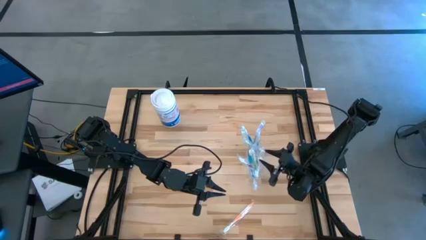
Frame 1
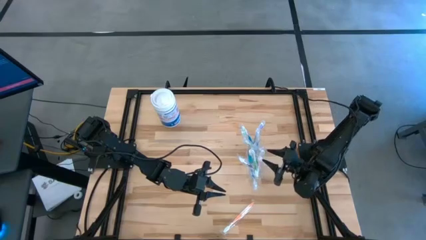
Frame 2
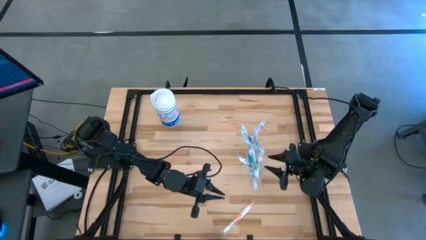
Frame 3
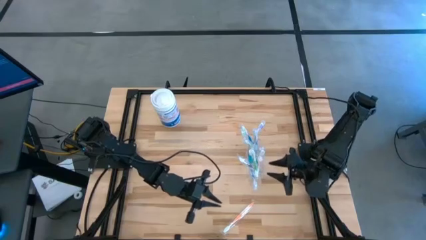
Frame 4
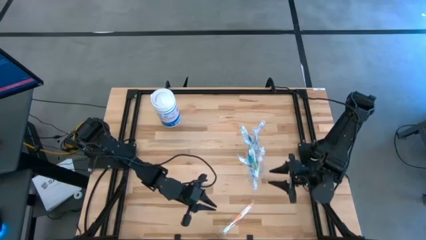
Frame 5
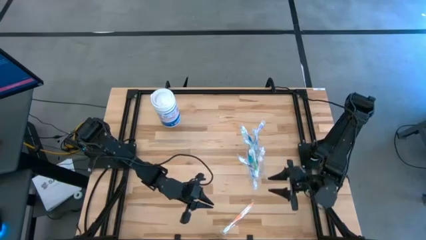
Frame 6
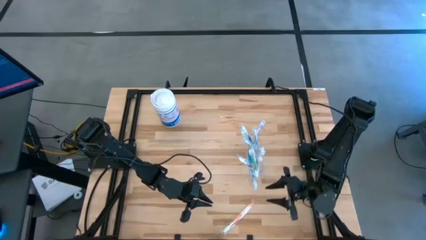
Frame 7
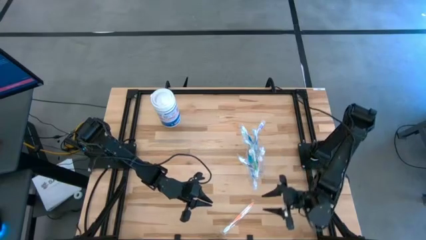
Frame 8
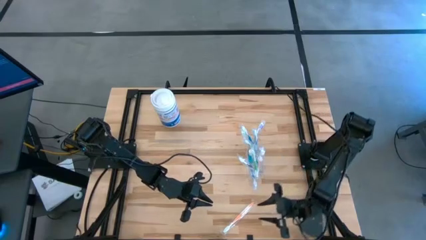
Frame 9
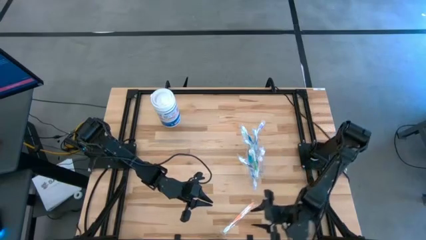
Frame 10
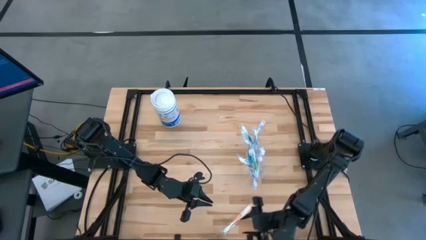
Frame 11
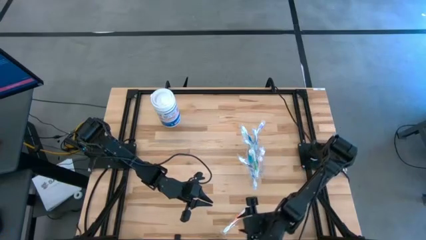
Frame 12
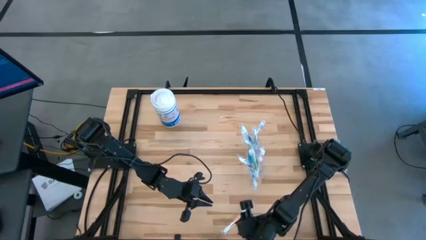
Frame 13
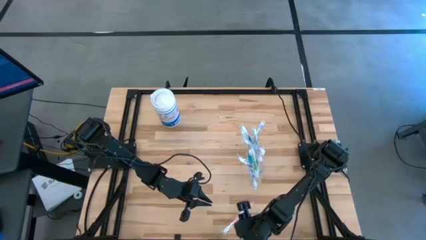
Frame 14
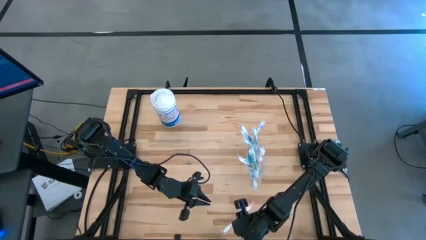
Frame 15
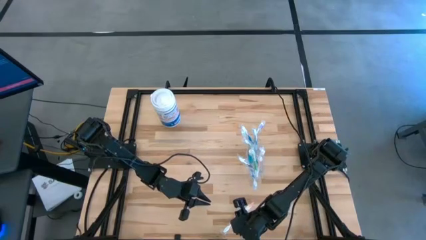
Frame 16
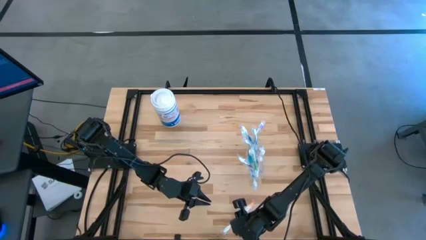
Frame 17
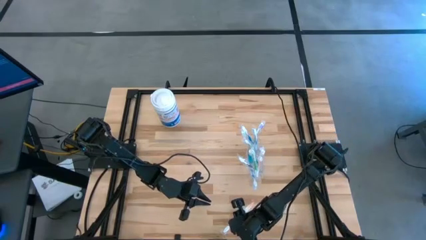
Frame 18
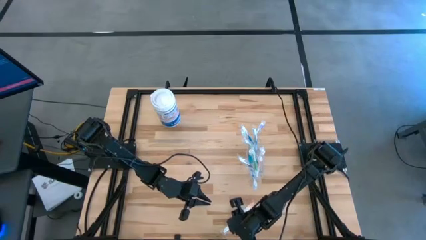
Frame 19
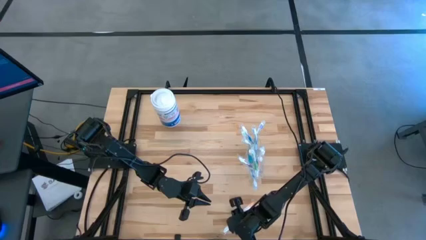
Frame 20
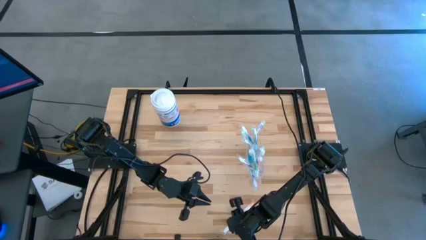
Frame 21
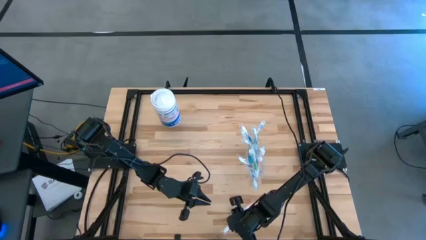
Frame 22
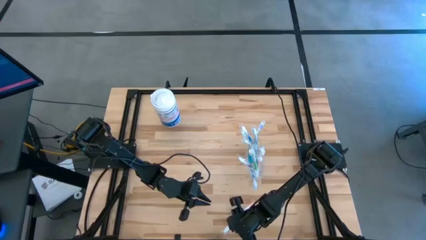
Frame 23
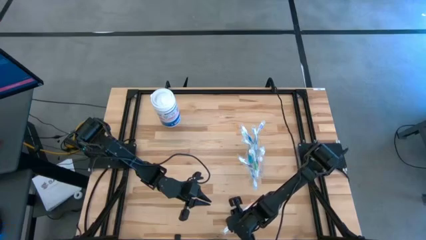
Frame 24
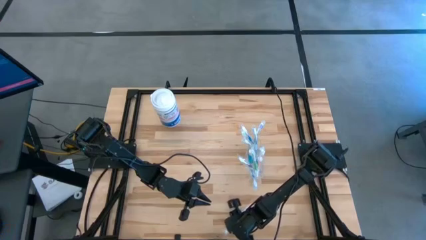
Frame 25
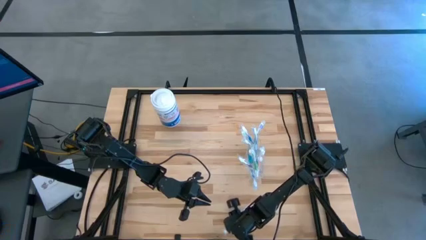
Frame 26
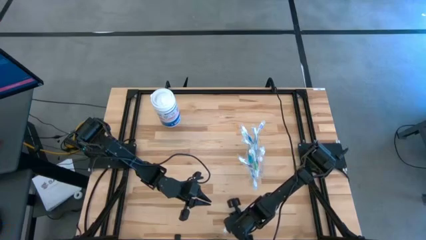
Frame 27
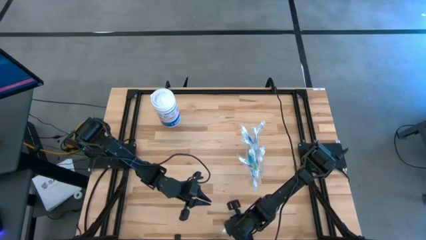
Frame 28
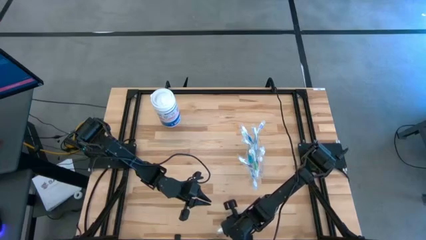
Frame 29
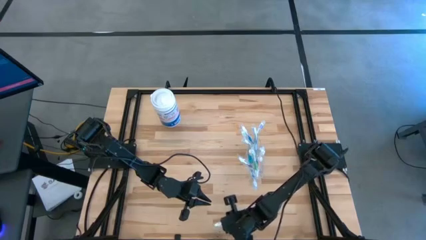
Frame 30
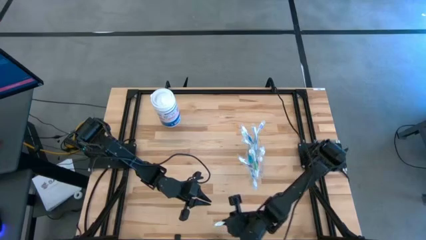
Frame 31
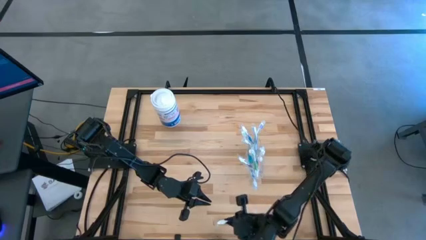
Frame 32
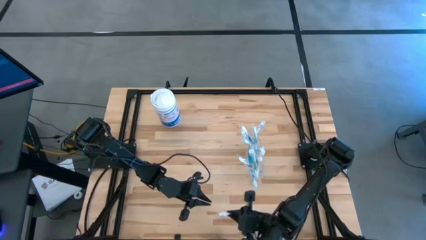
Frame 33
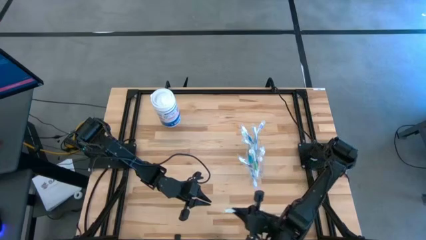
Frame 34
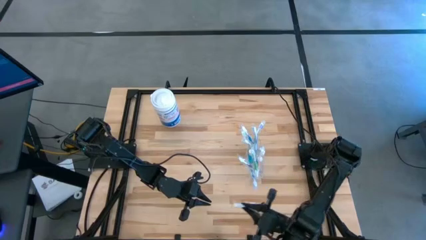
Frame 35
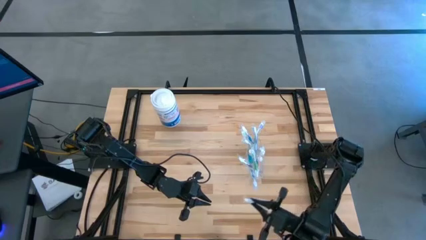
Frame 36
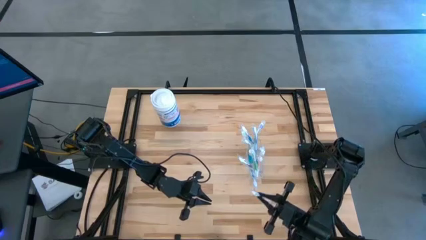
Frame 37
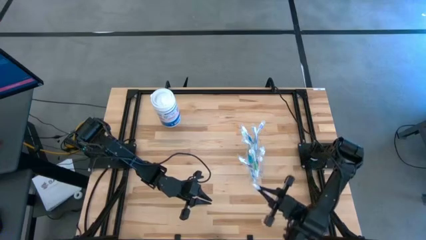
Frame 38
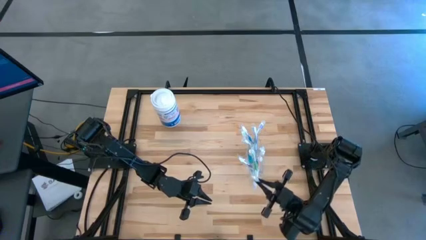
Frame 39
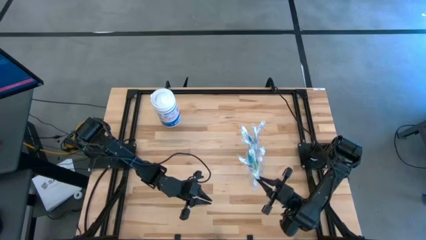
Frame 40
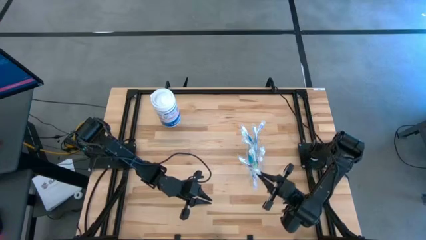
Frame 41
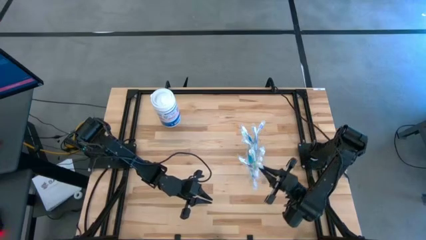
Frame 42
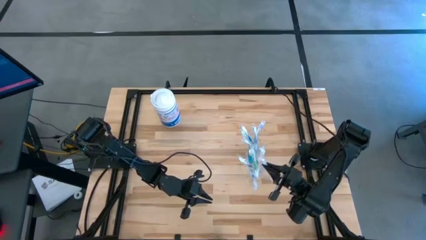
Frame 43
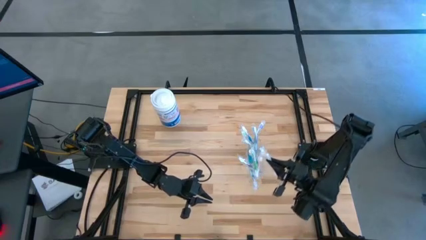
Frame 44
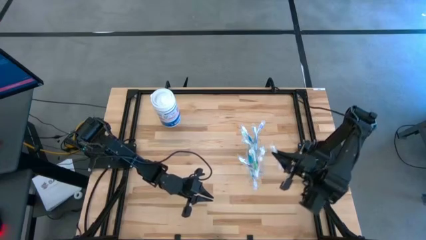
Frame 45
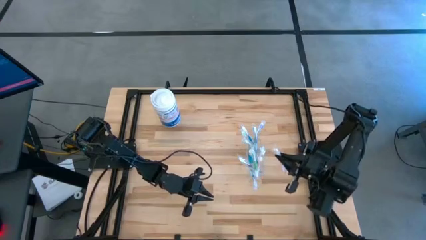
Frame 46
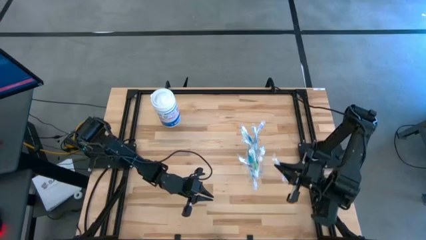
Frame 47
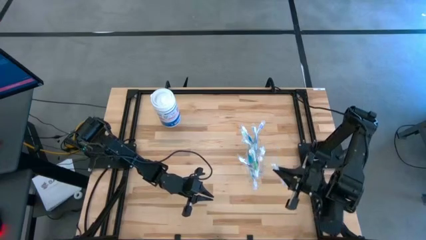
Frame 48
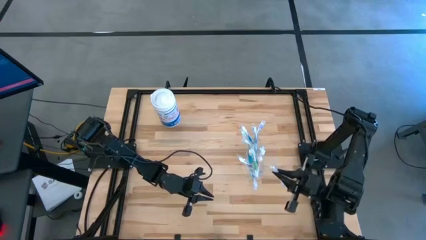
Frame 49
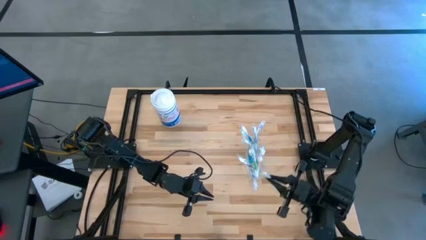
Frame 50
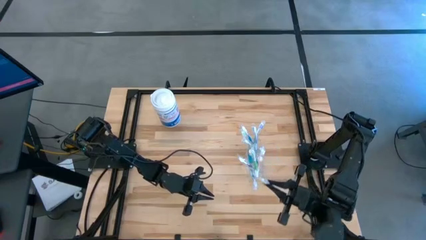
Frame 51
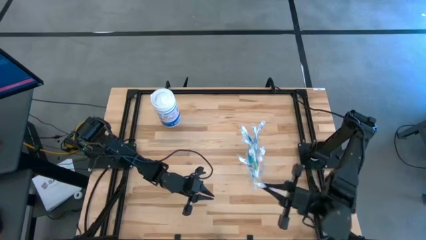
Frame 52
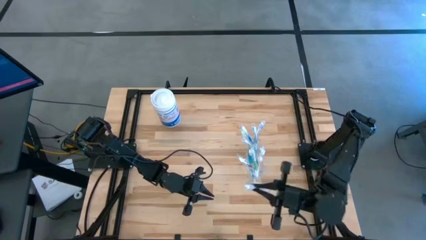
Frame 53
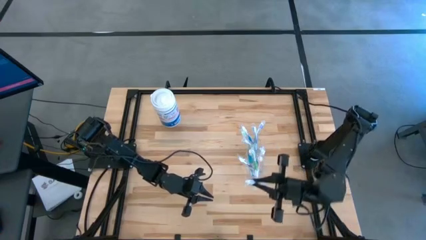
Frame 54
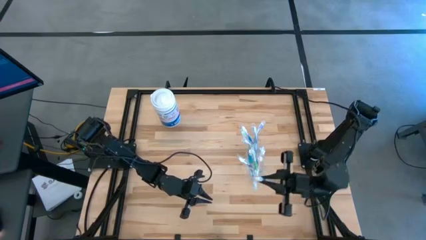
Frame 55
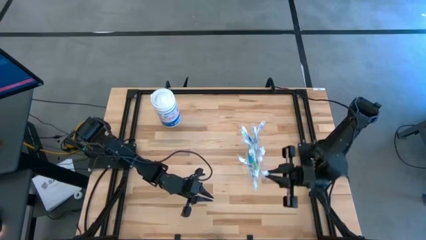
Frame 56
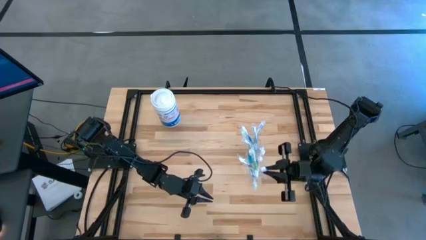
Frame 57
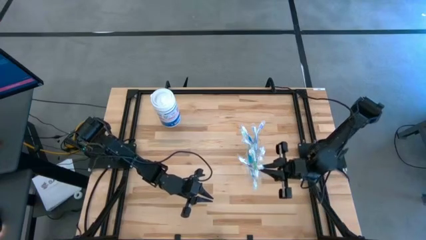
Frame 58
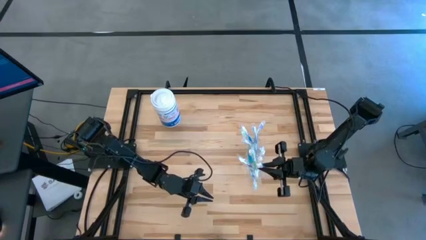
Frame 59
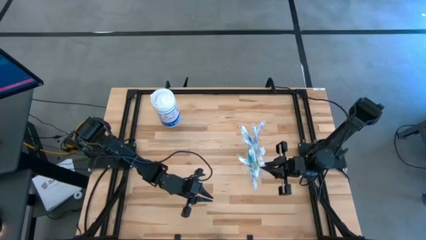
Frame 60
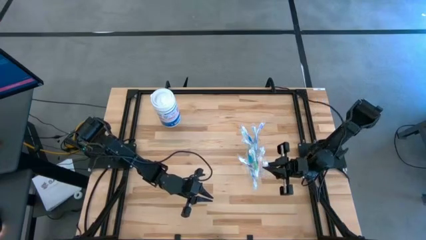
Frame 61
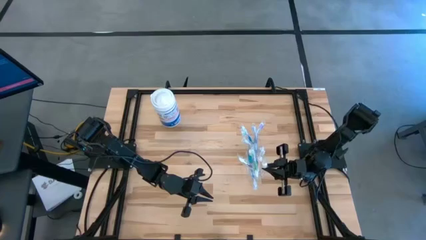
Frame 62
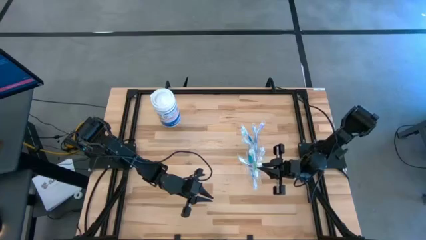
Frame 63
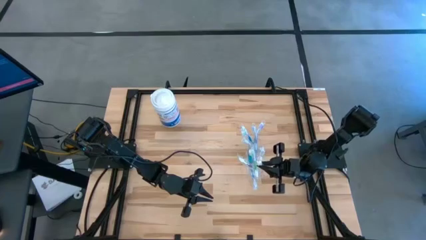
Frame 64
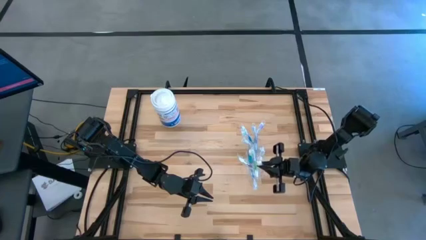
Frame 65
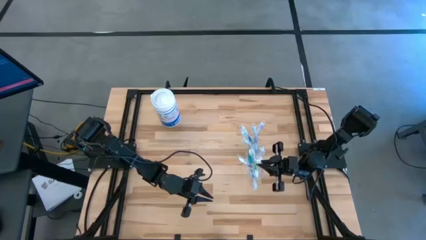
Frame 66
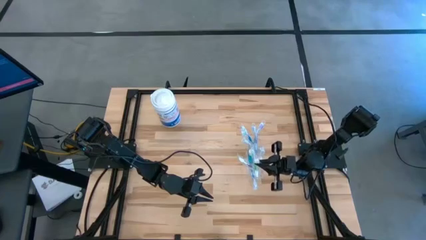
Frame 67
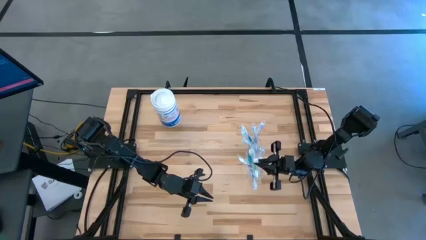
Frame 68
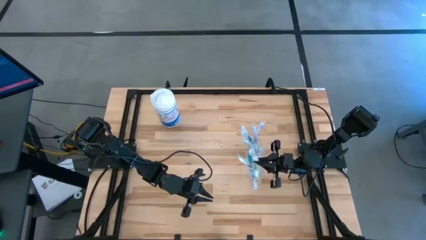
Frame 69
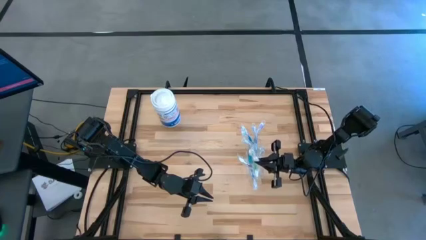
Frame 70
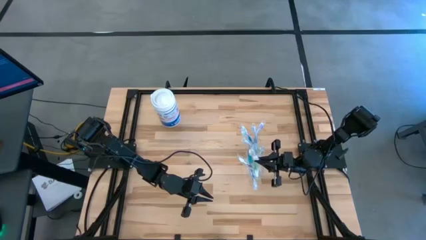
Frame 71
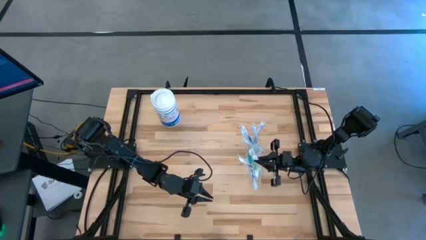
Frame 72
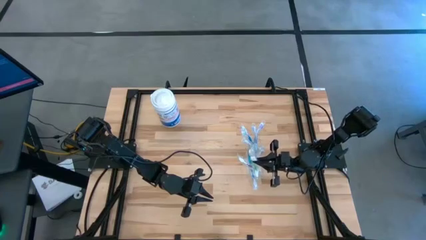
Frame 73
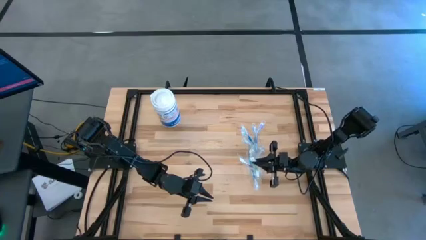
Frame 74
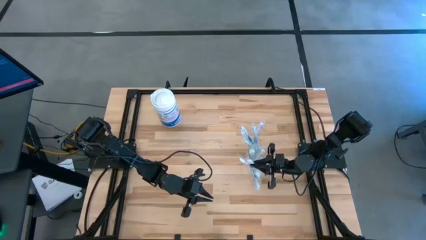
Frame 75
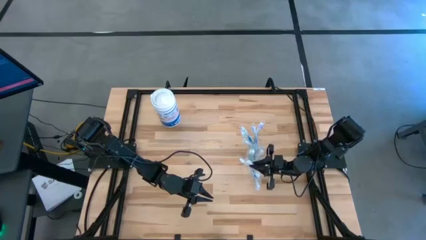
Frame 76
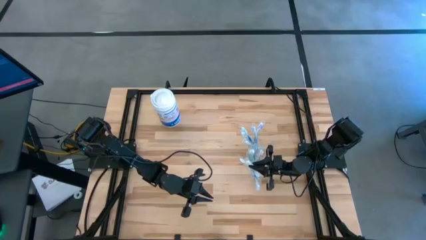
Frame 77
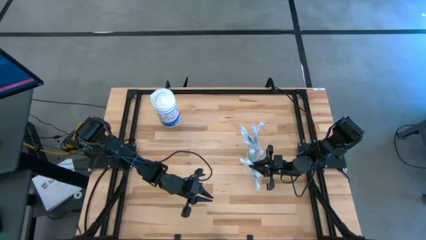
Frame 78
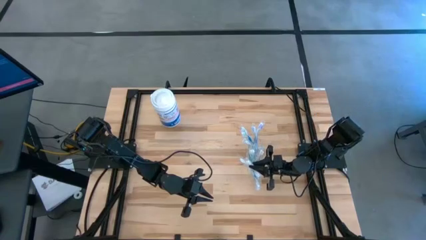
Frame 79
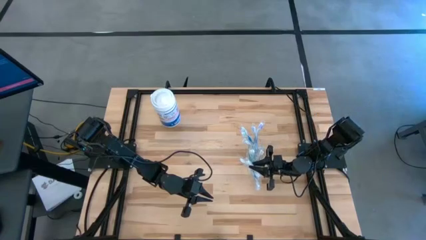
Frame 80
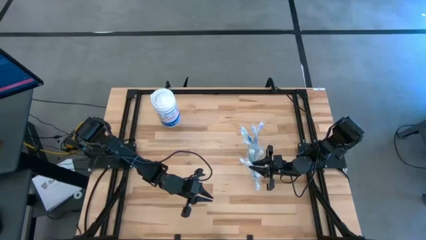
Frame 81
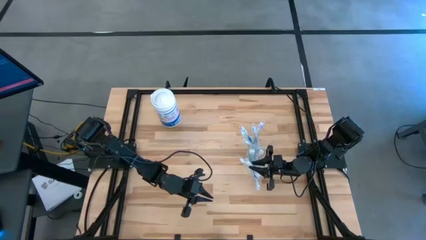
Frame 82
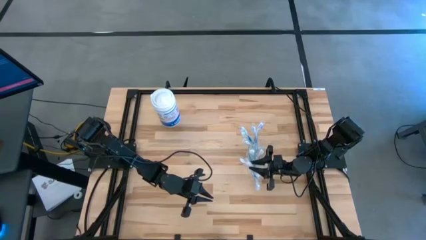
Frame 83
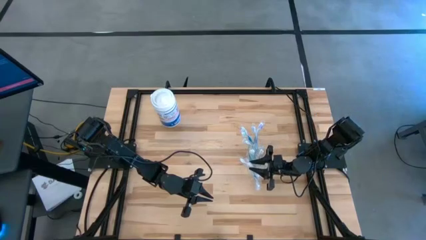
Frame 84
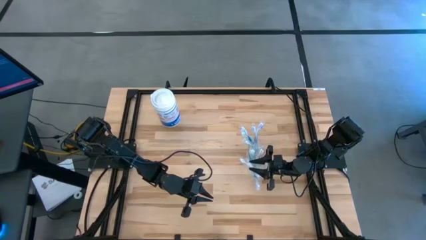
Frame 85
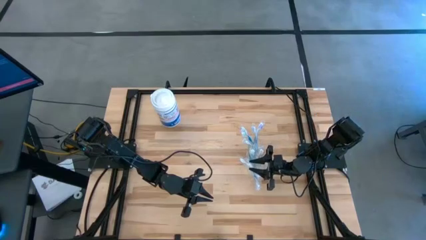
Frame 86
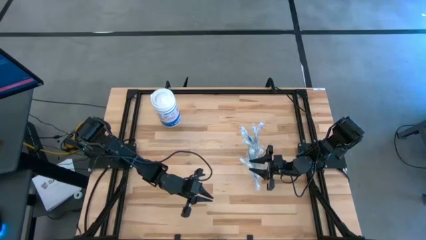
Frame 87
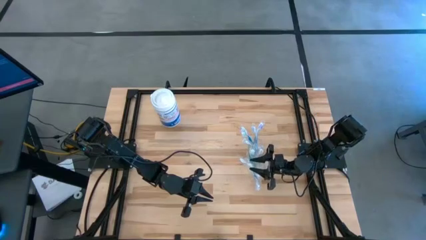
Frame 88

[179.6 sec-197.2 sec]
Task: Pick & Place toothbrushing station
Put the orange toothbrush into the transparent organizer
